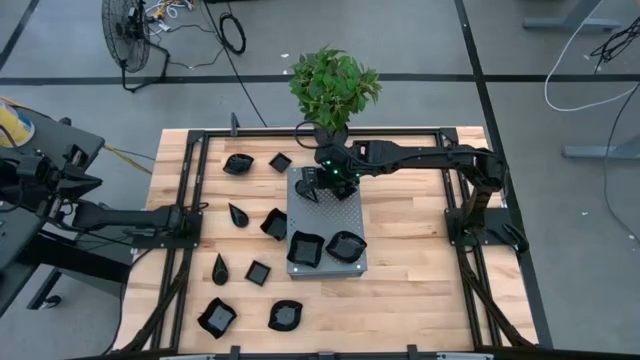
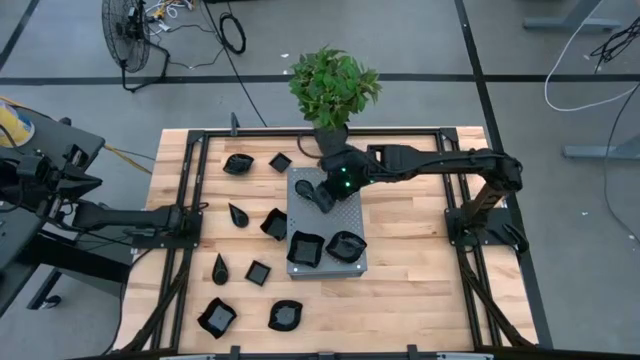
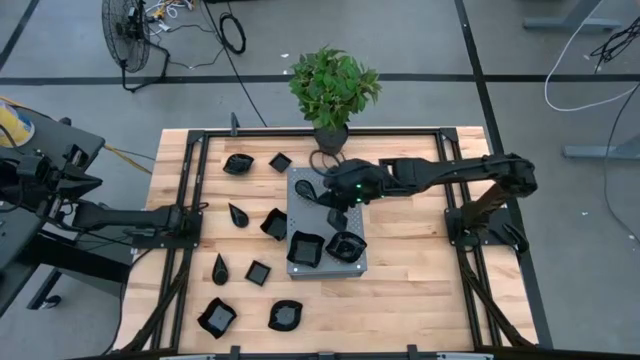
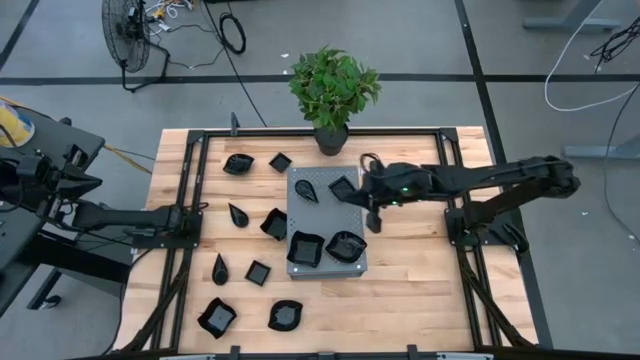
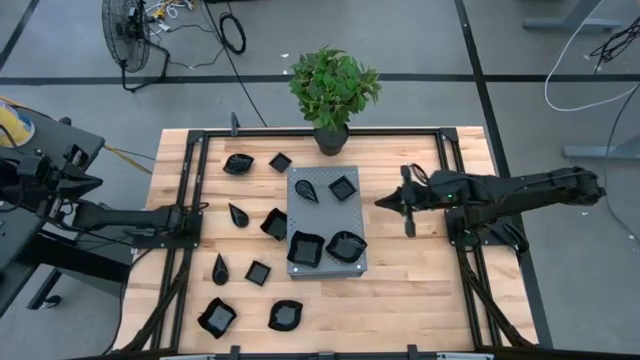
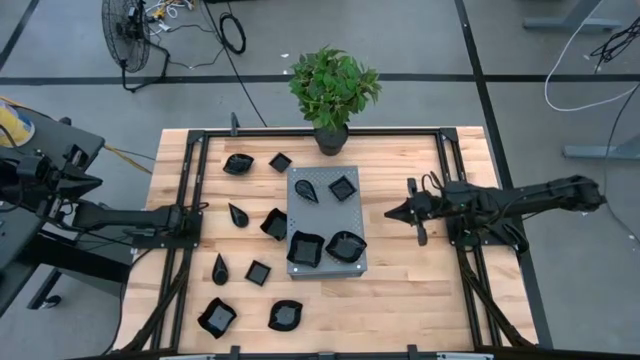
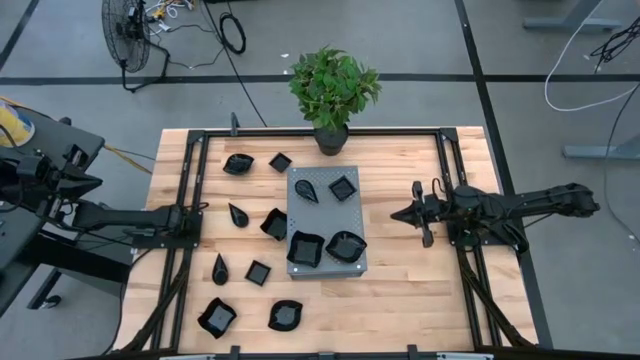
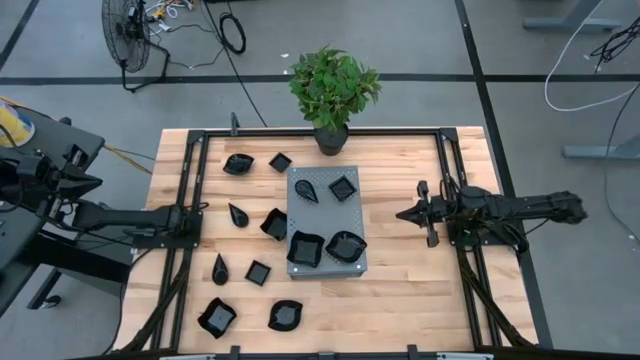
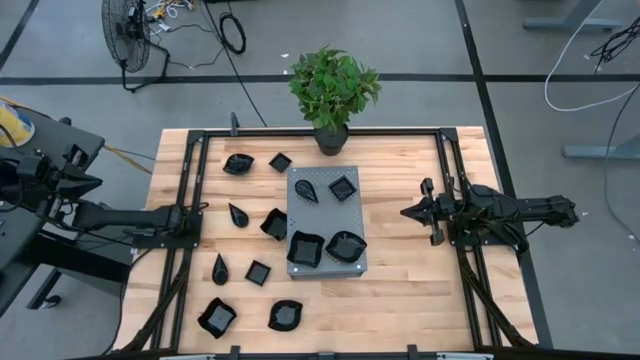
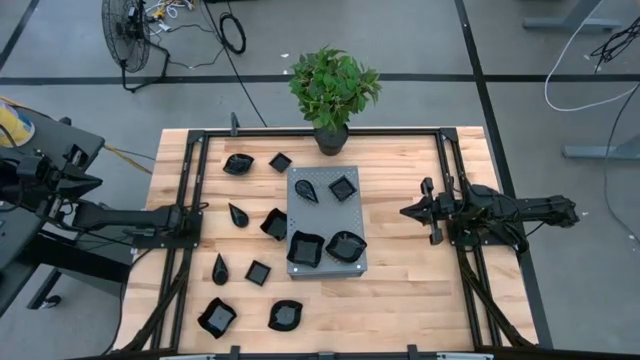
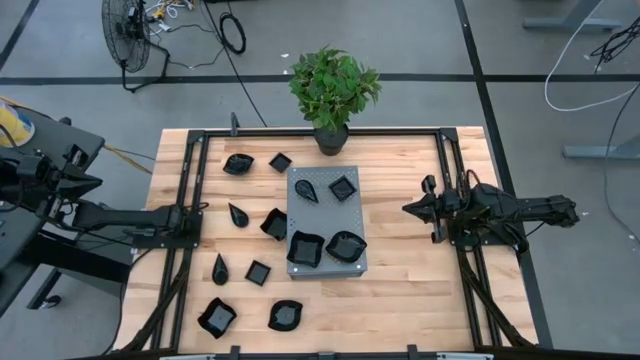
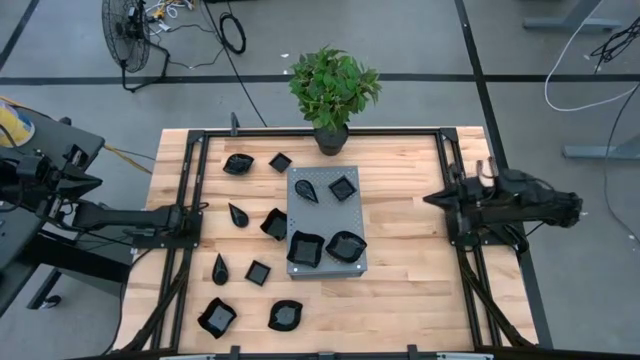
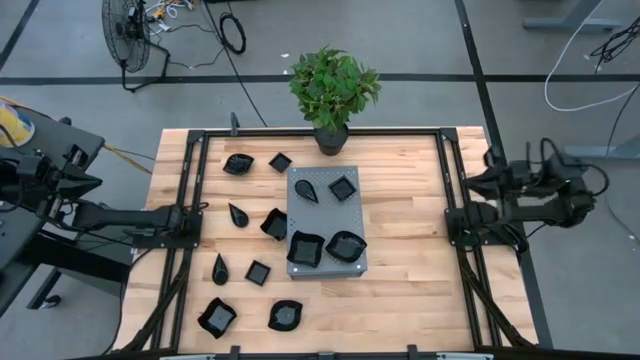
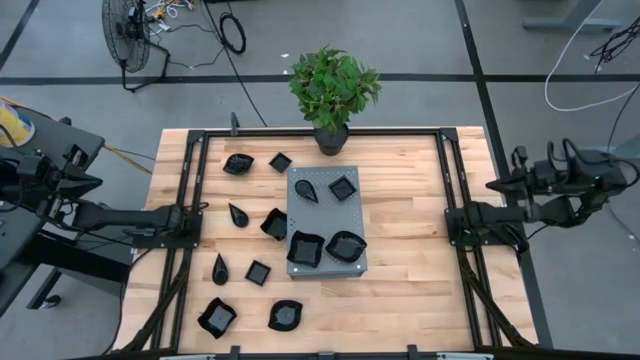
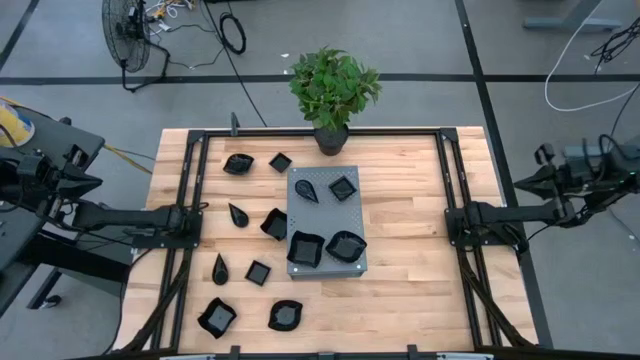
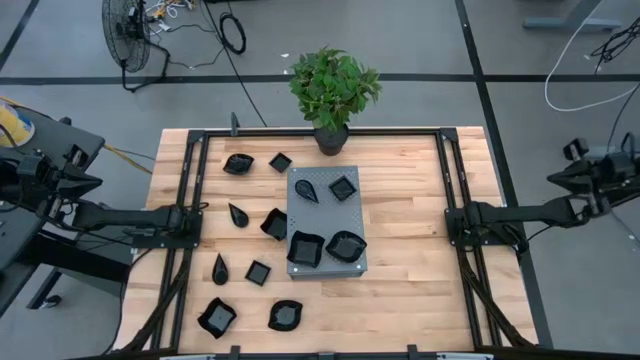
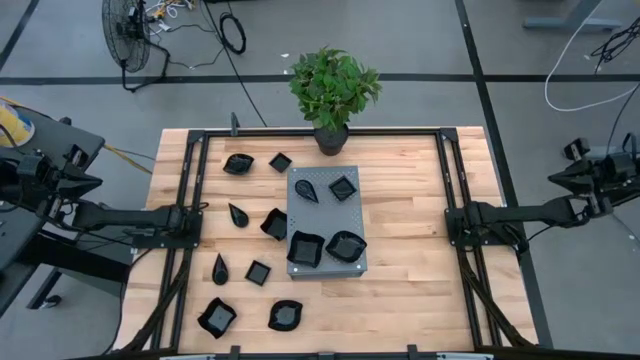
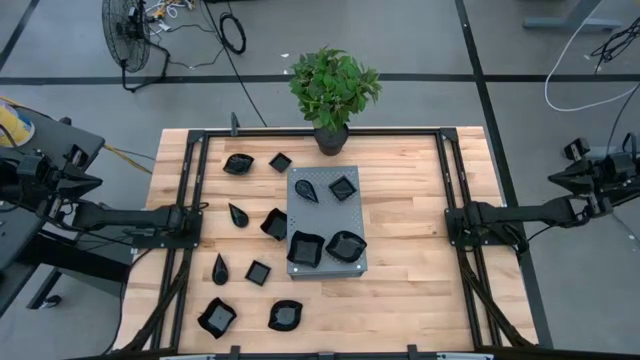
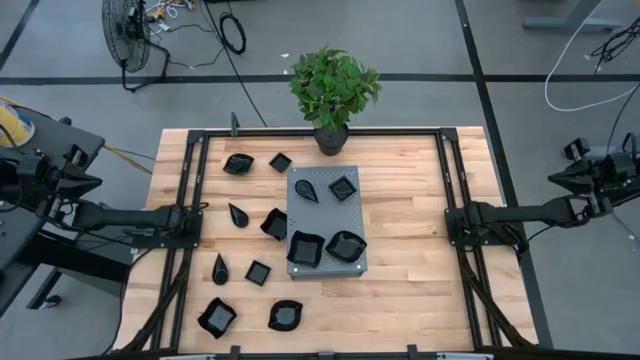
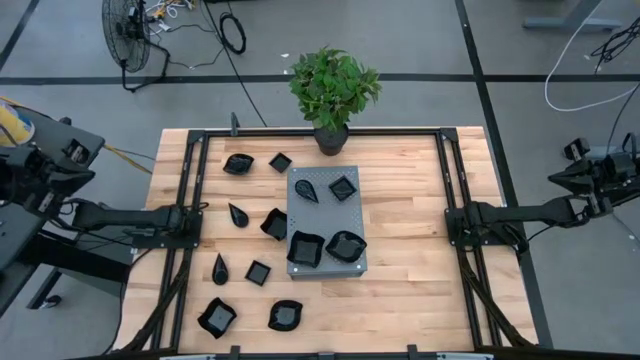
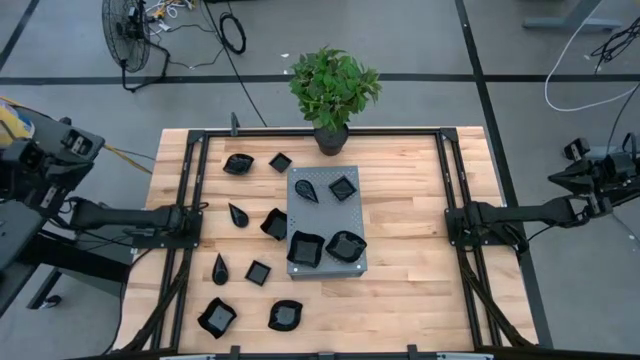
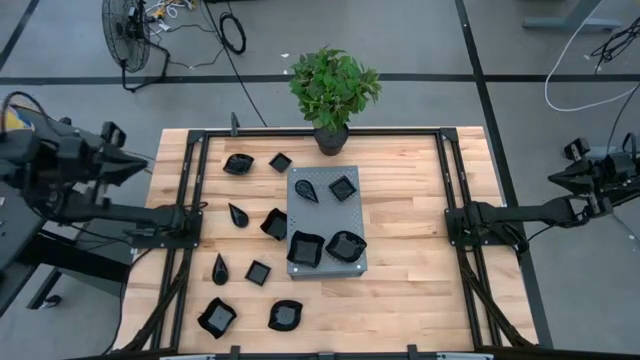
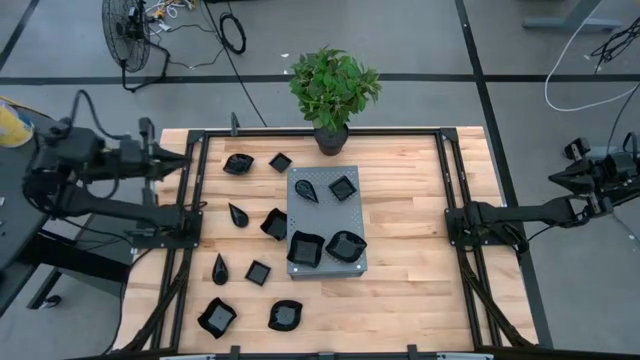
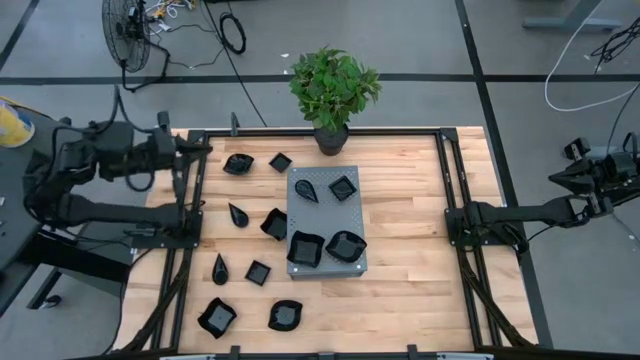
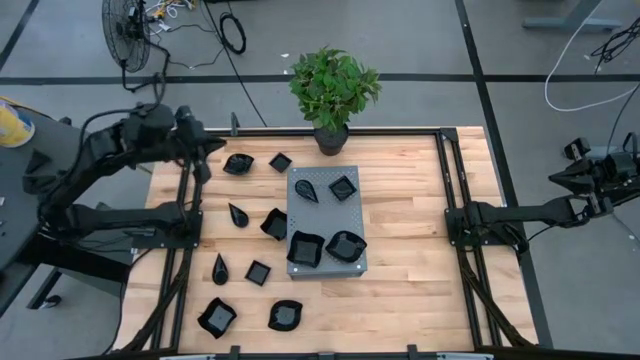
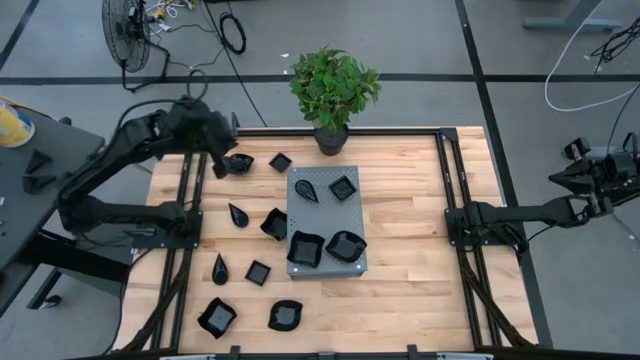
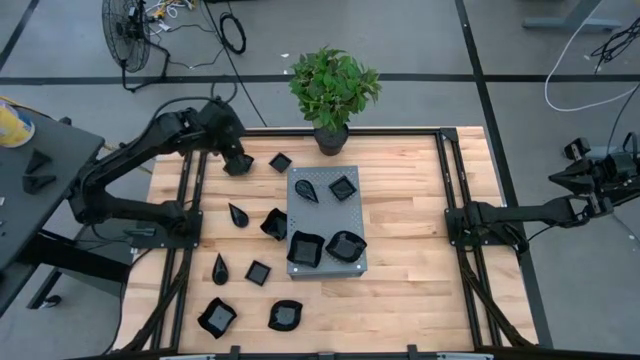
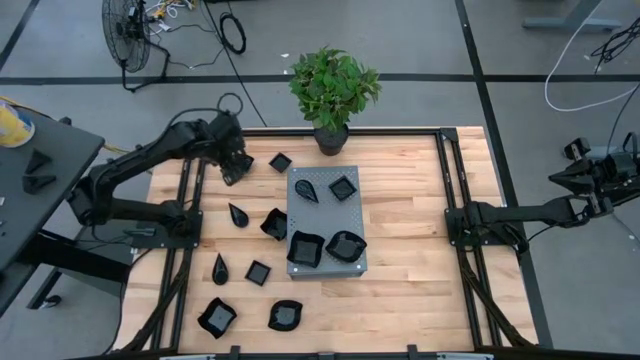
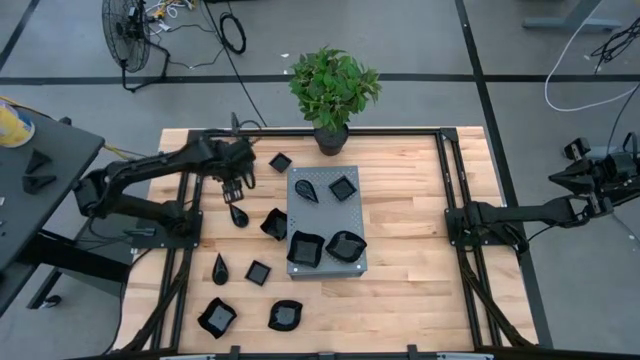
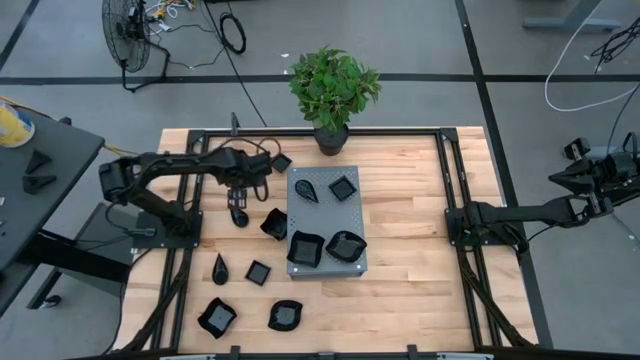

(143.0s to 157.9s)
Task: Pick & Place Mini shaped plates
Stack the black bowl on top of the black bowl on the shelf

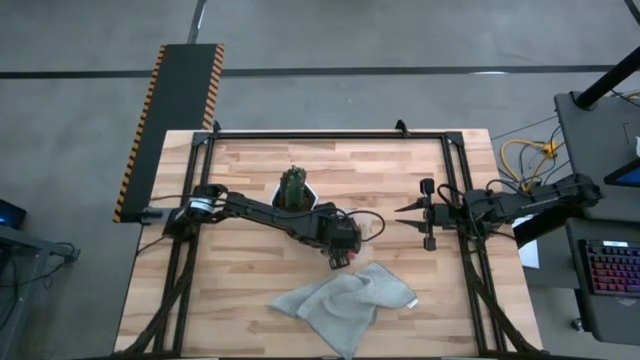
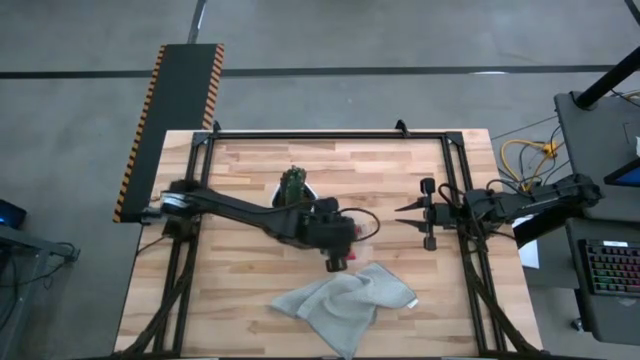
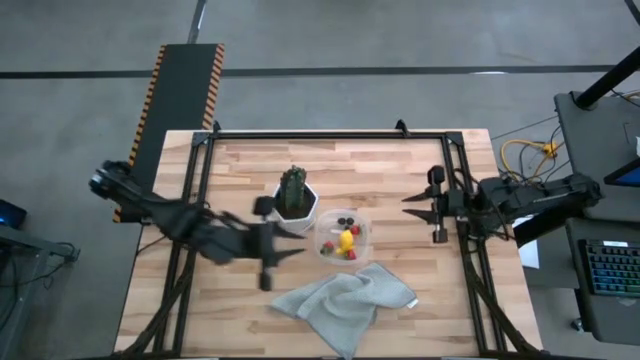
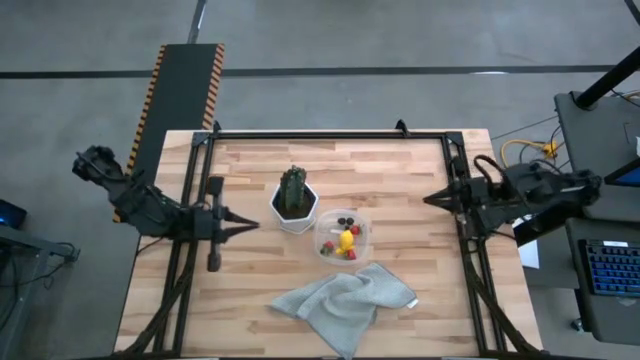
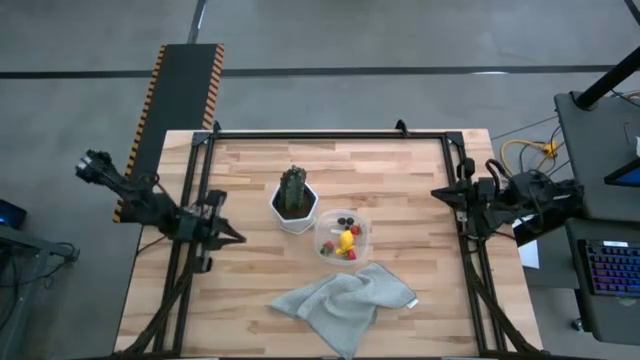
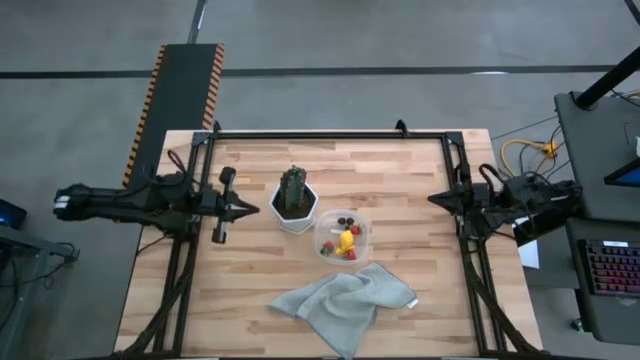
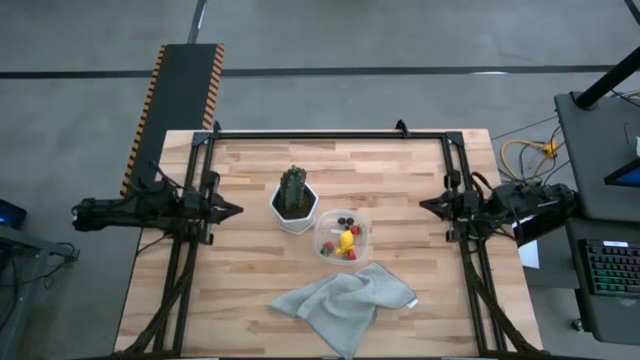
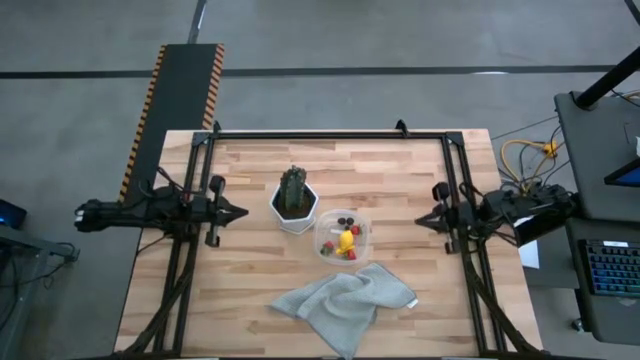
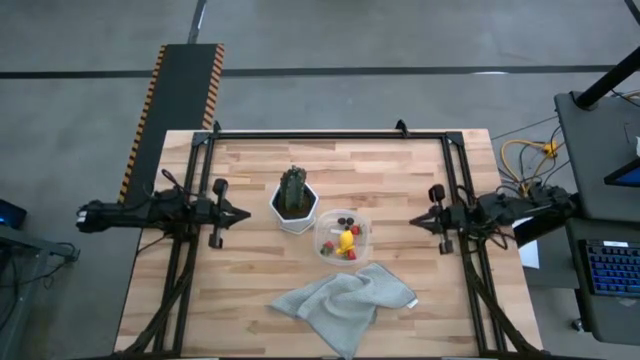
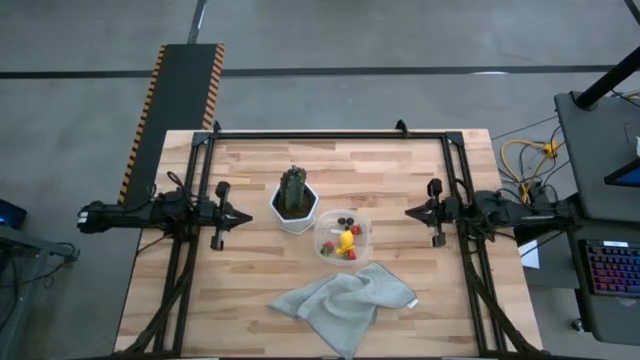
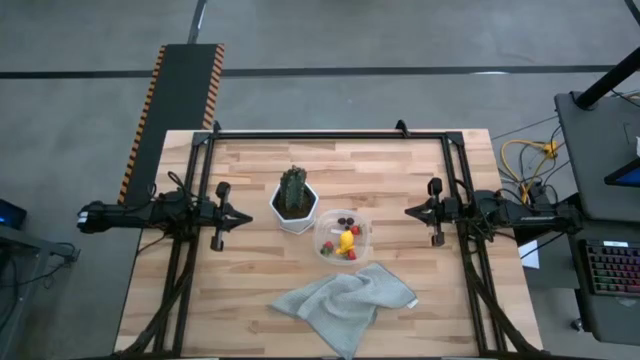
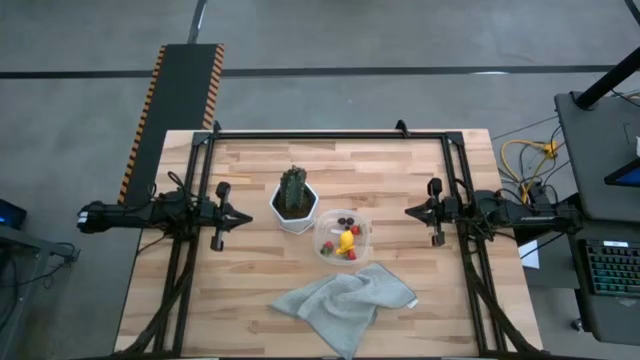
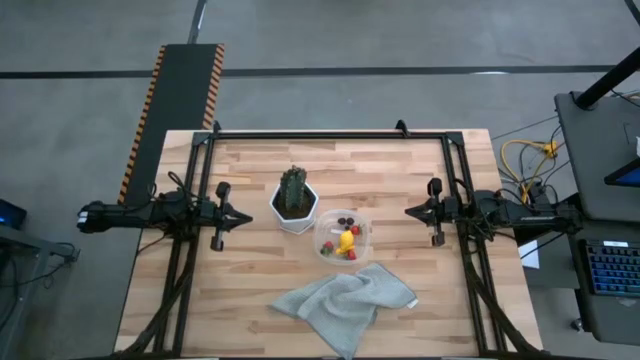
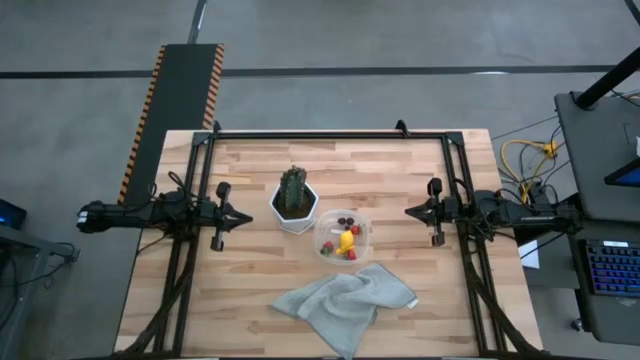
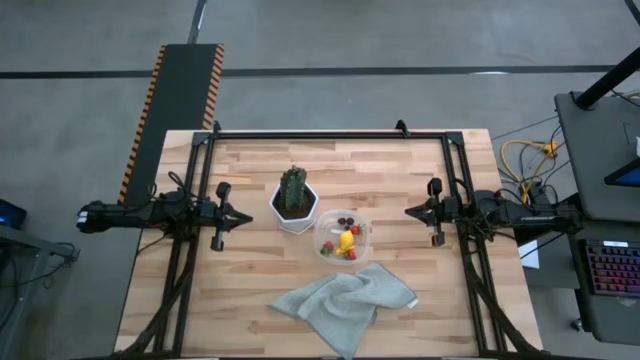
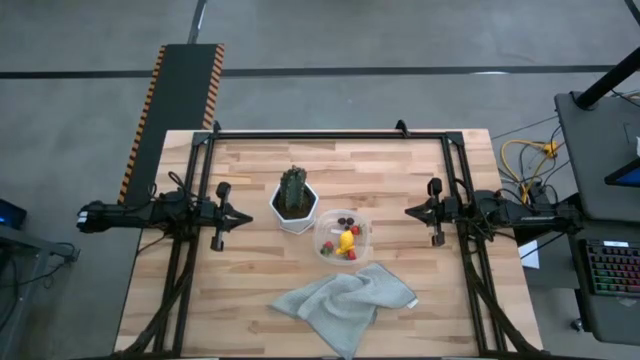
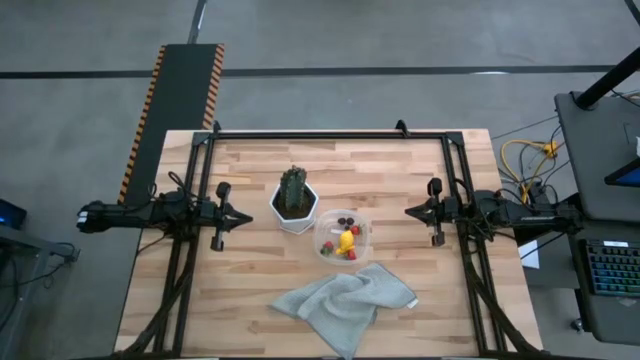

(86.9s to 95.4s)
Task: Pick and placing Produce into tupperware
Return to Home Position
